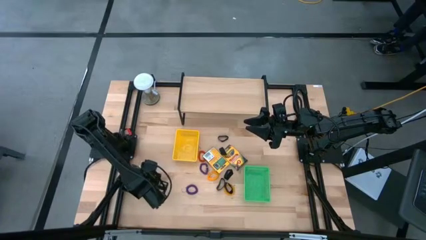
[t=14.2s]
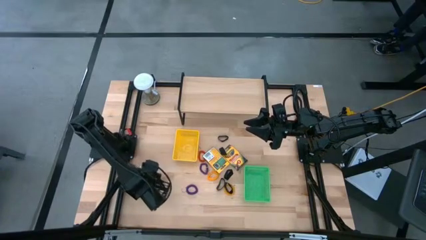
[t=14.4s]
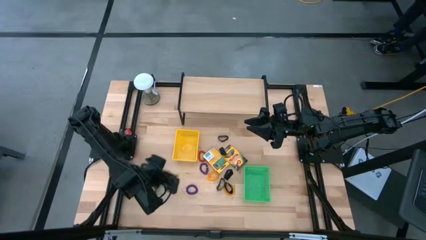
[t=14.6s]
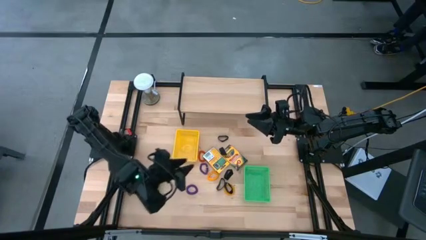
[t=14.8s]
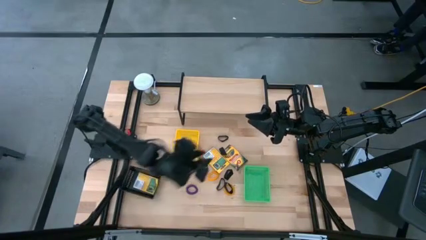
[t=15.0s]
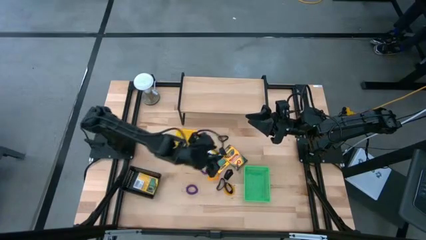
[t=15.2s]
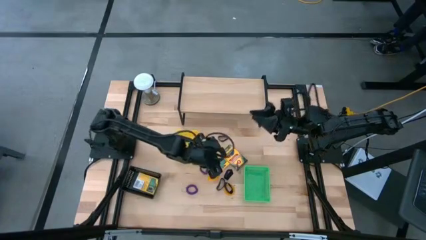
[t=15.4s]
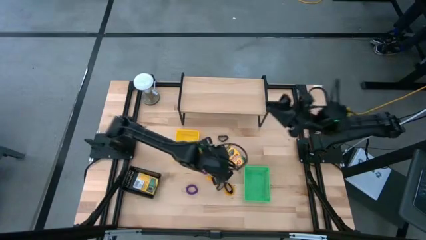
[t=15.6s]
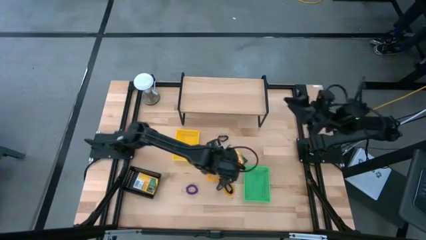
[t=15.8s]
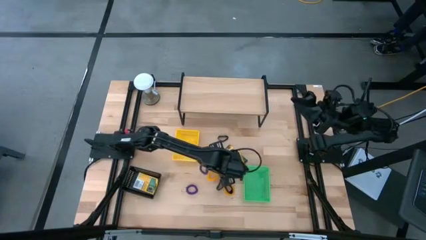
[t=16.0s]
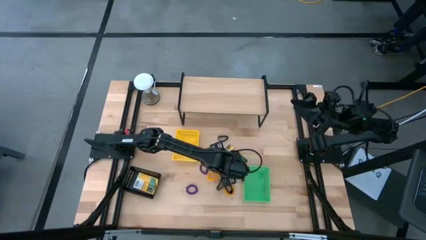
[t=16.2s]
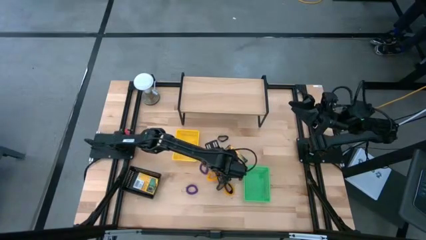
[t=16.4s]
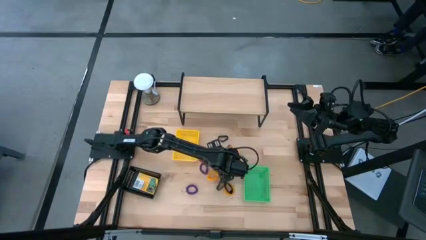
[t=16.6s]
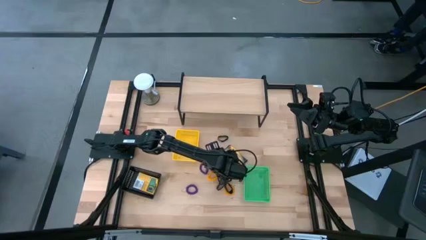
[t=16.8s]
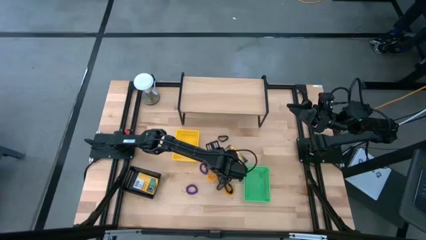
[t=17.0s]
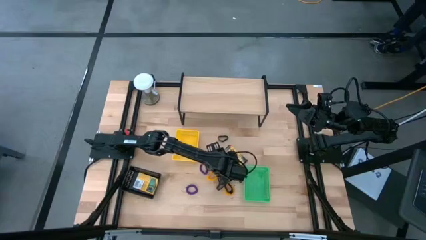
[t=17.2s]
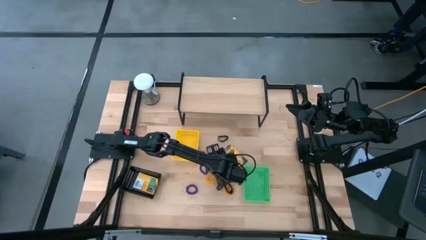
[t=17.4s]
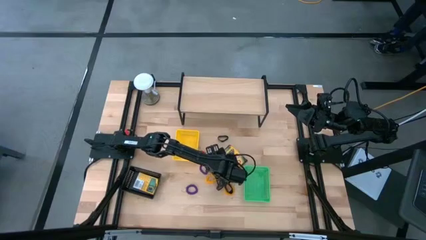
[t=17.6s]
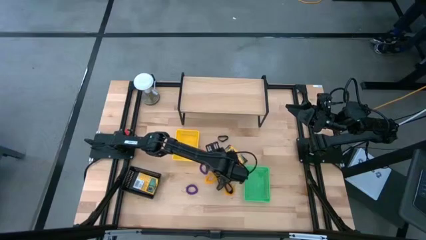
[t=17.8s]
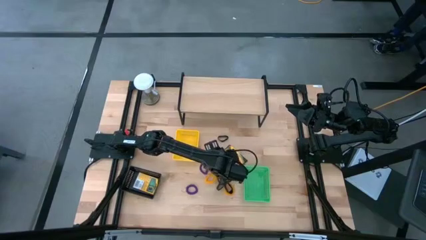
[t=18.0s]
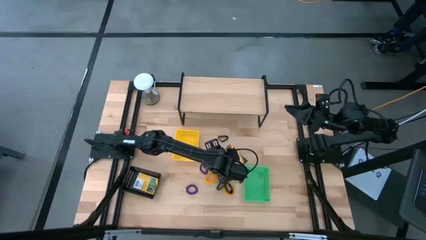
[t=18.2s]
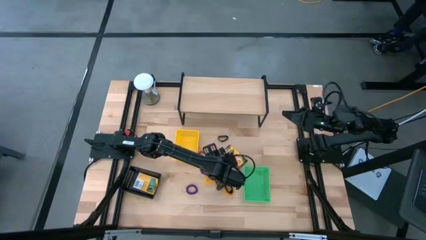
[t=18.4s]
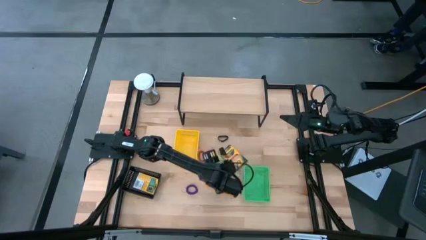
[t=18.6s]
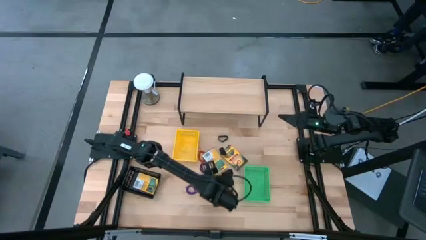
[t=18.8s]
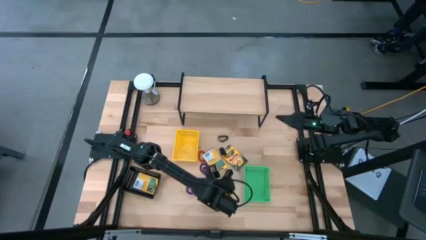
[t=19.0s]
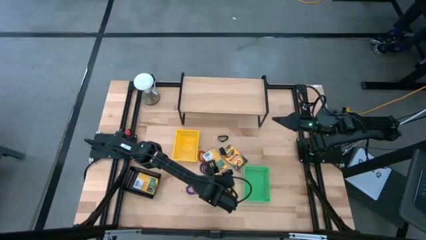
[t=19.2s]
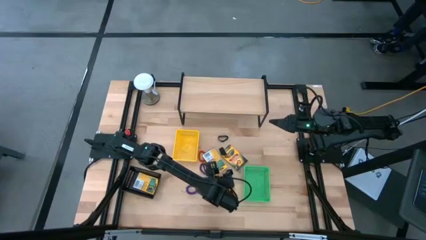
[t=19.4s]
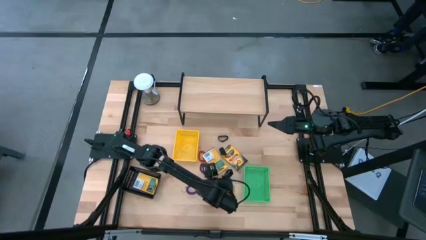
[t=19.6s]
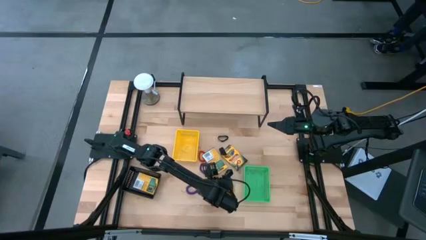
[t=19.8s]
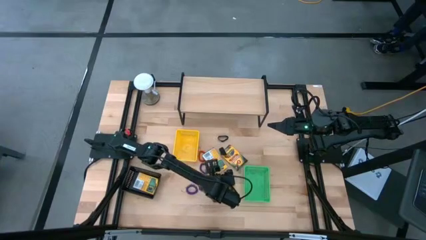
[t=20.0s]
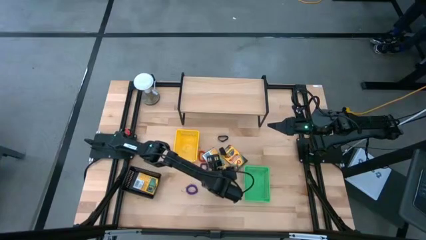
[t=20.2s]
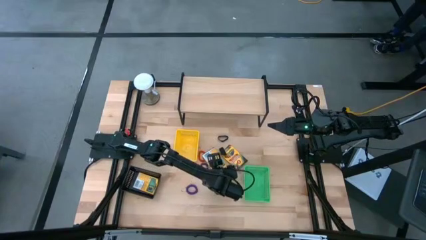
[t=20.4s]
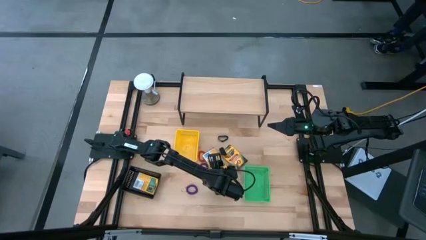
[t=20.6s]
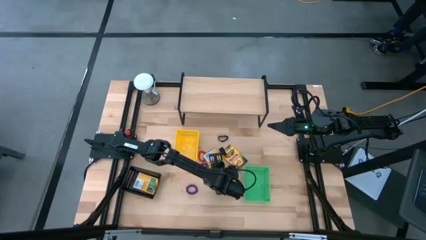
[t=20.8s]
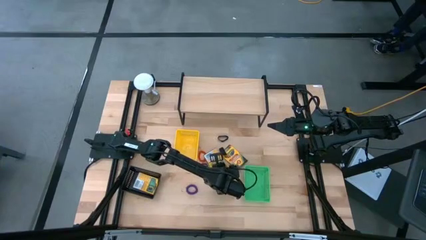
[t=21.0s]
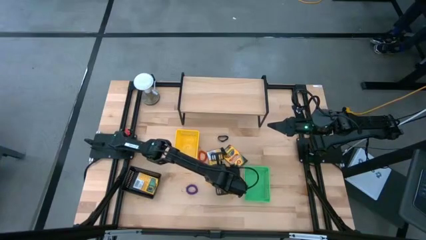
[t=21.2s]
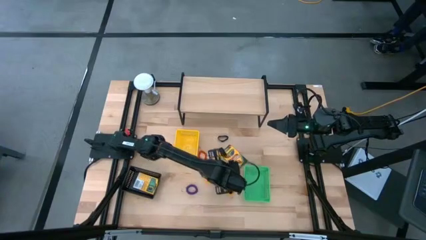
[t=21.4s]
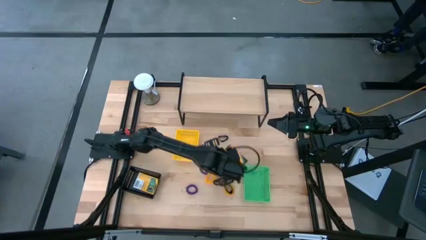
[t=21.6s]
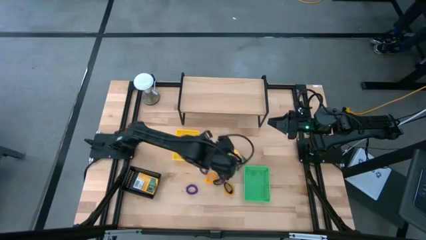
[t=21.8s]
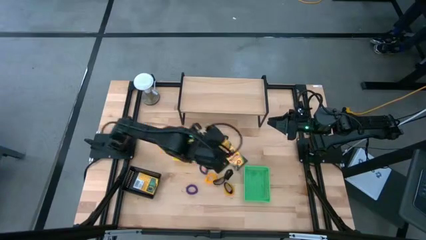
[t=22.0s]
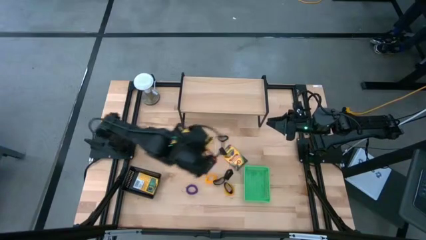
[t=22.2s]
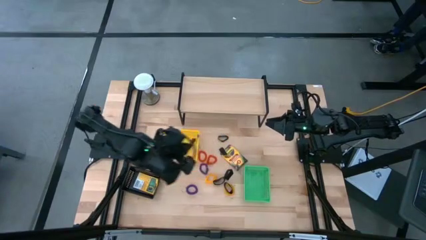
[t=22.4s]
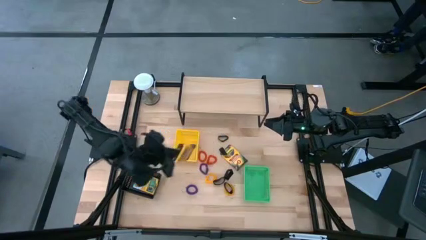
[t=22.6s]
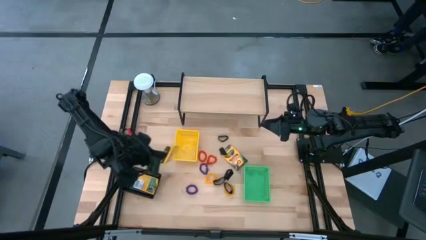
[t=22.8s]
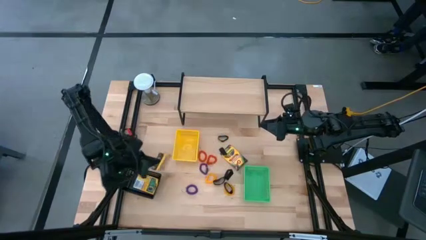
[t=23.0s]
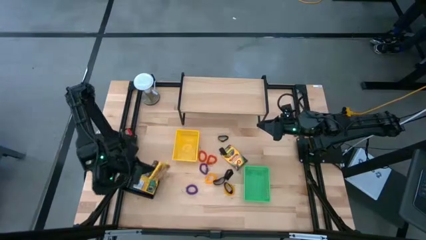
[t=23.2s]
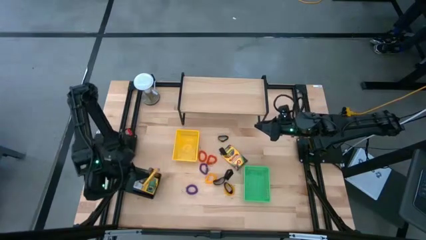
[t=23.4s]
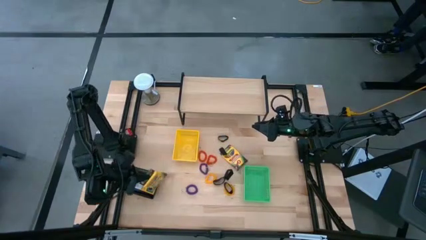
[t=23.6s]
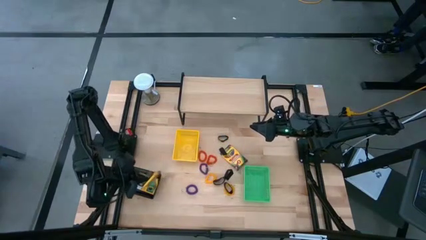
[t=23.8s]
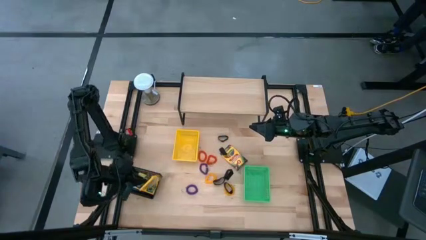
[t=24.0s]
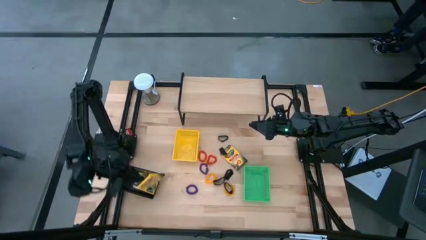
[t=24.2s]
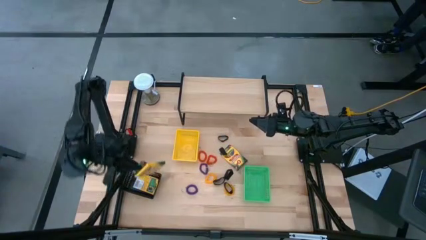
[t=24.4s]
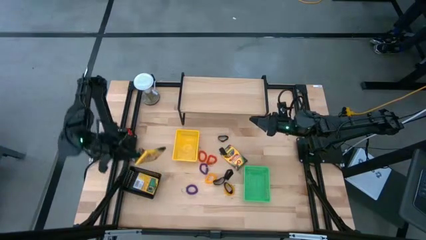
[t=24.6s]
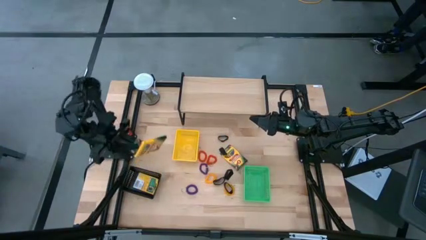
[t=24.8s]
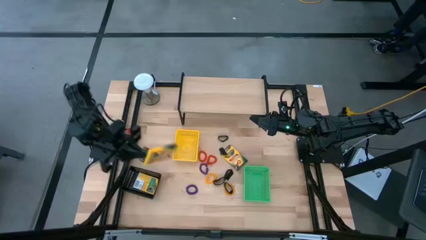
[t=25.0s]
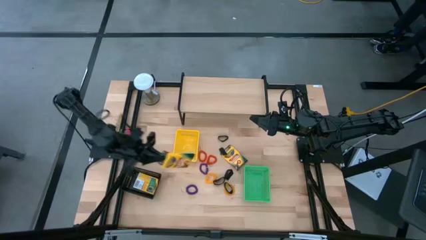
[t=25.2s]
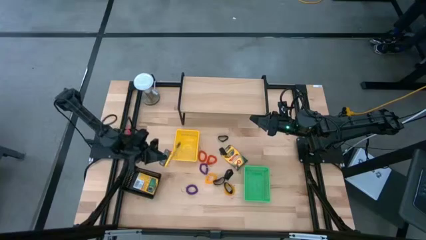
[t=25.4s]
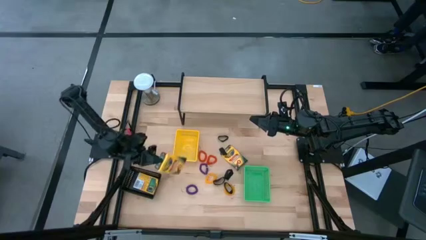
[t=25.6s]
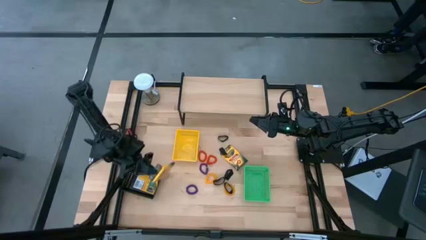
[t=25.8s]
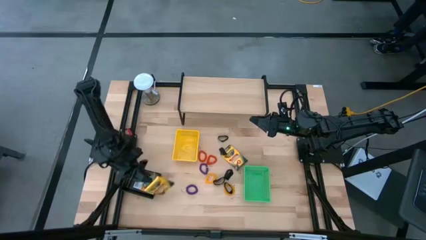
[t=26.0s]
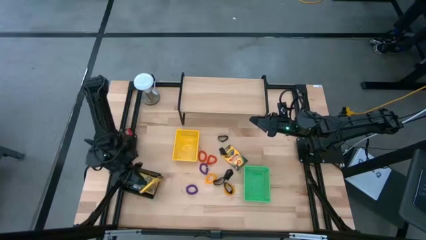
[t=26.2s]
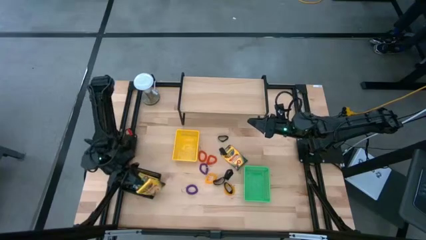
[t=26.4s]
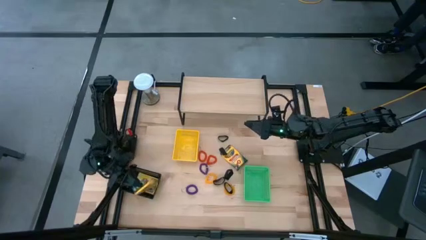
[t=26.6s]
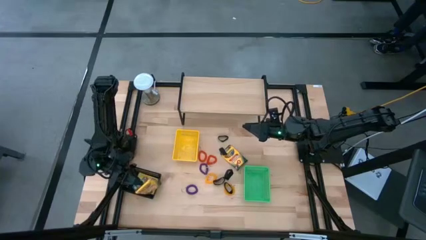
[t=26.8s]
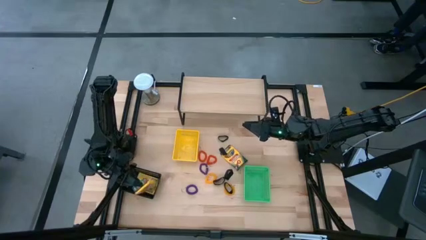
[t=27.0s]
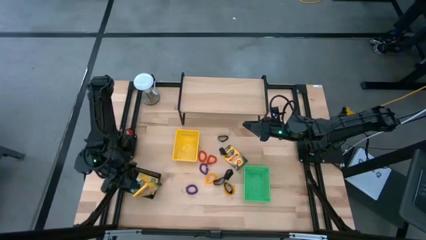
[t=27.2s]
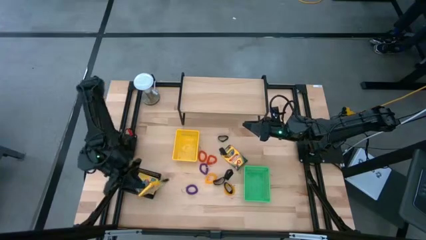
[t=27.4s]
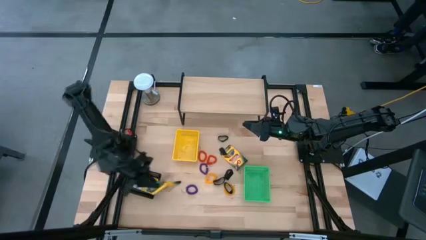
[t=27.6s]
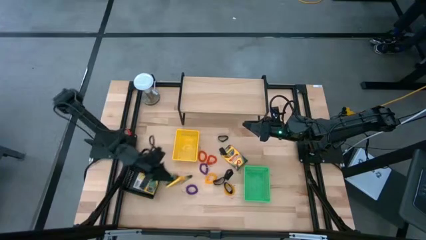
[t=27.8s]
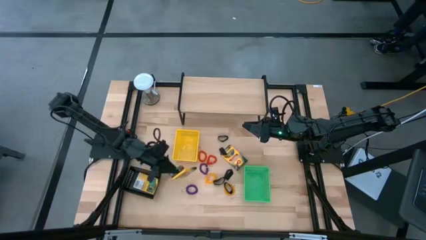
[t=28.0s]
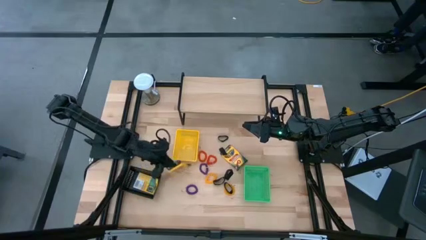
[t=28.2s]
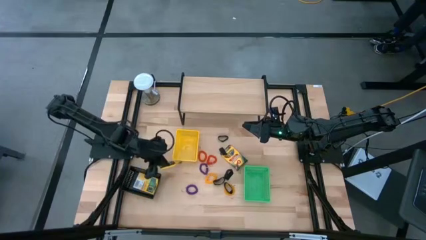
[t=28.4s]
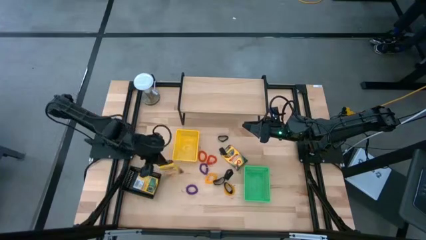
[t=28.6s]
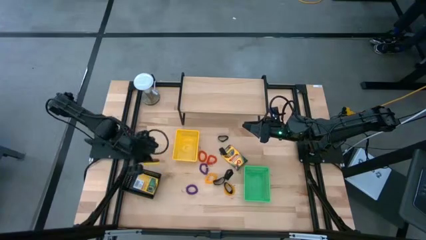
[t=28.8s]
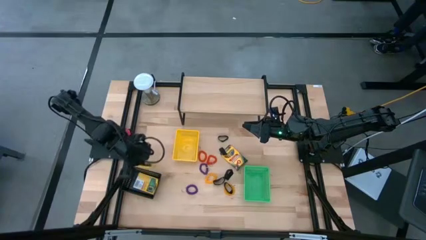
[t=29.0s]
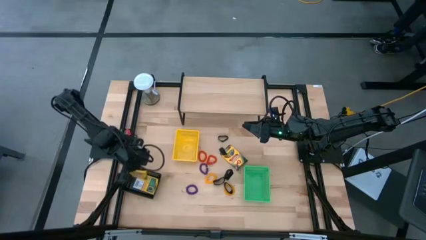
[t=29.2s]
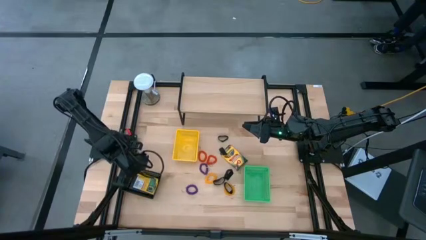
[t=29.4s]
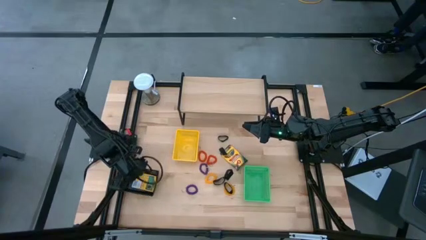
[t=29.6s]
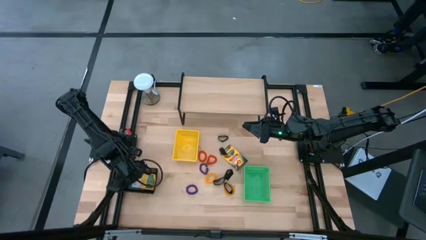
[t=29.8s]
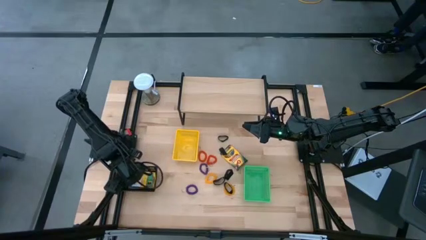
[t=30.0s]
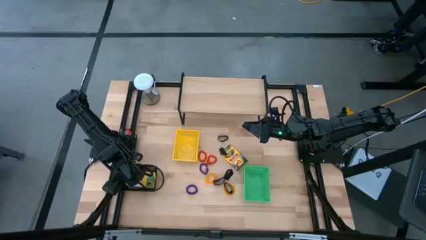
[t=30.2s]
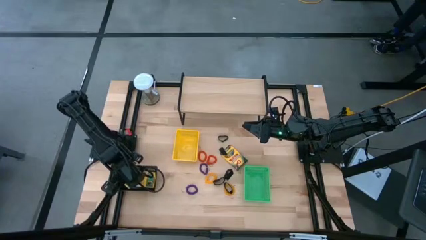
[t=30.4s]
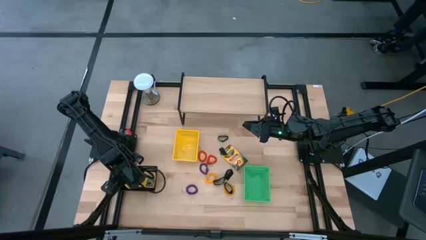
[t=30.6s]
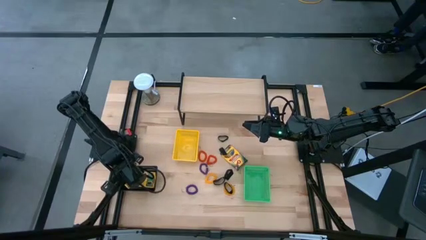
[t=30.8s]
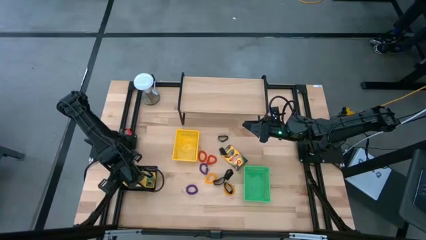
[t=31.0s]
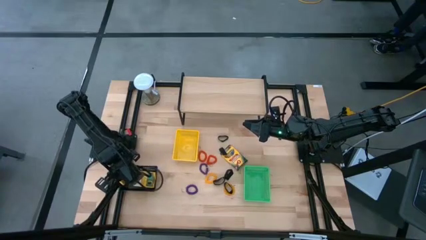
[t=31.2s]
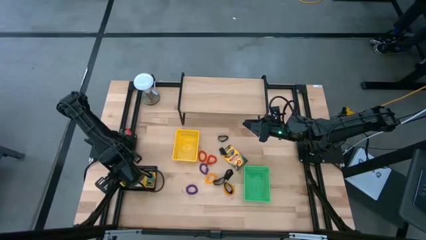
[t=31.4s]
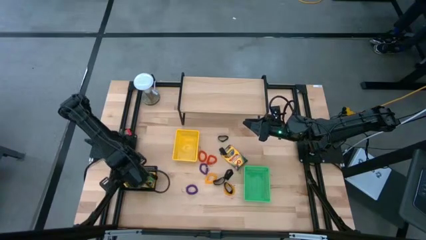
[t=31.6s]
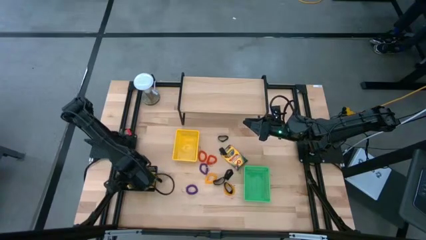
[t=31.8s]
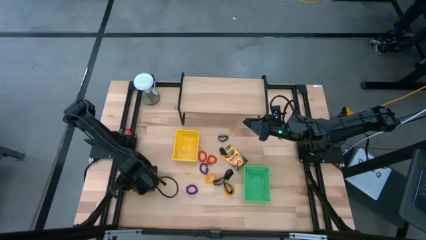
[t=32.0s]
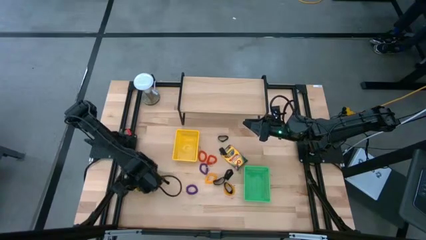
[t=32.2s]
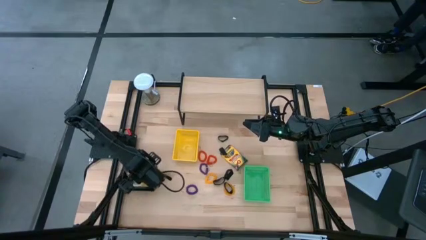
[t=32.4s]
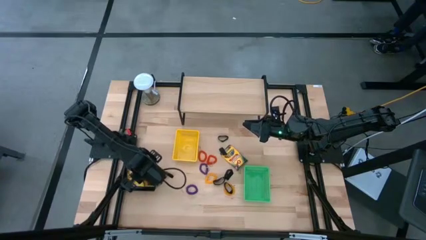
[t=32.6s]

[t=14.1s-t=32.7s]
Task: Pick & Place Office Desk Supplies
Put the yellow crayon box into the black bin
